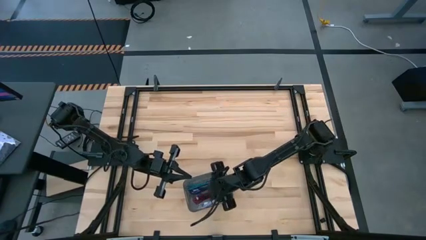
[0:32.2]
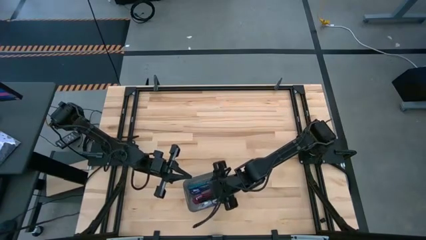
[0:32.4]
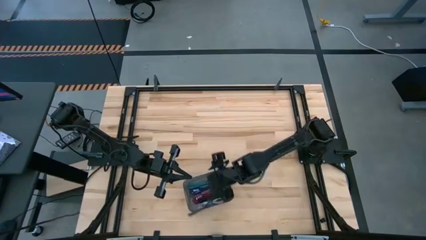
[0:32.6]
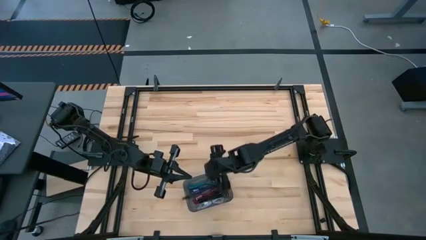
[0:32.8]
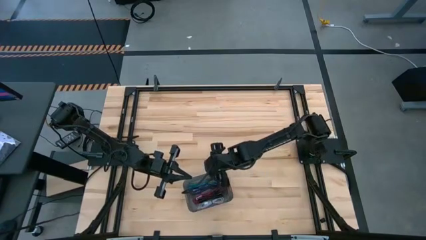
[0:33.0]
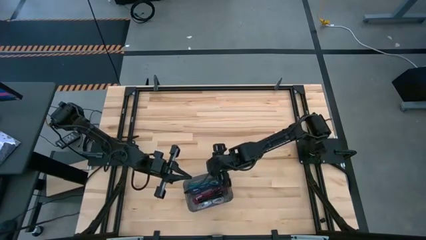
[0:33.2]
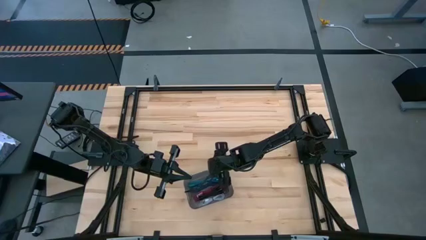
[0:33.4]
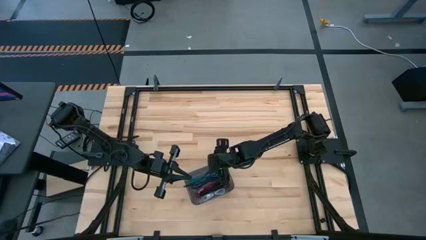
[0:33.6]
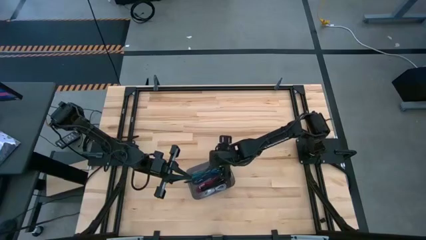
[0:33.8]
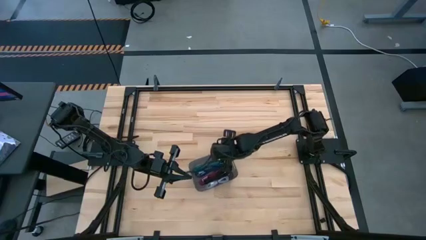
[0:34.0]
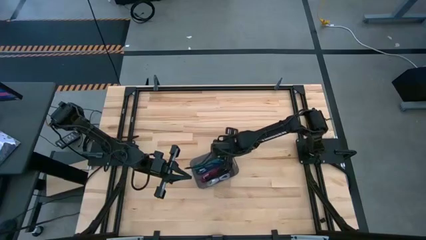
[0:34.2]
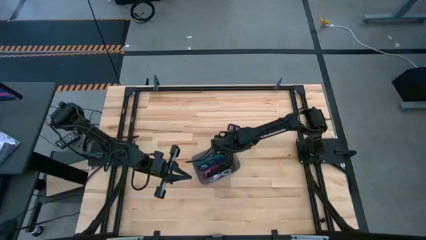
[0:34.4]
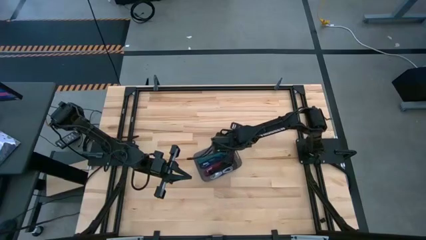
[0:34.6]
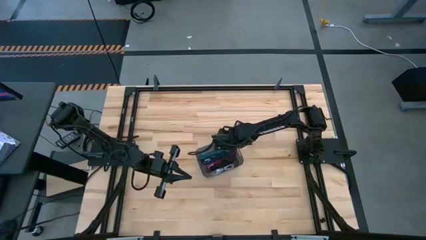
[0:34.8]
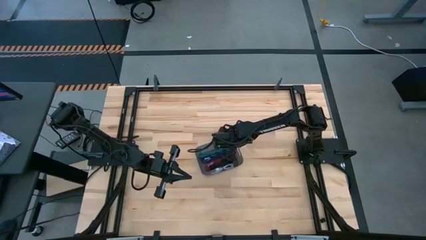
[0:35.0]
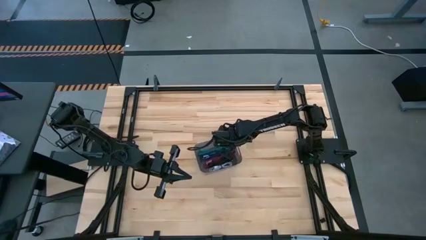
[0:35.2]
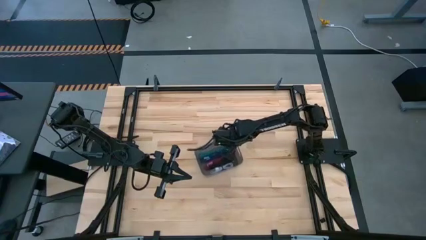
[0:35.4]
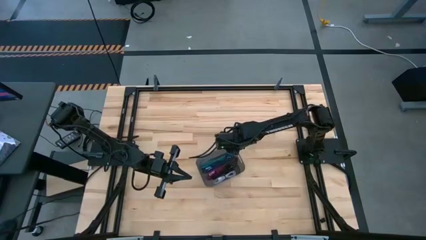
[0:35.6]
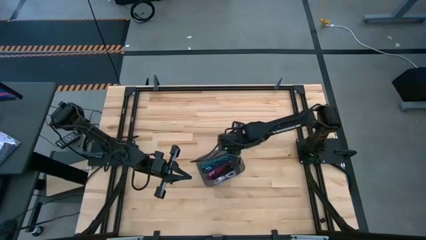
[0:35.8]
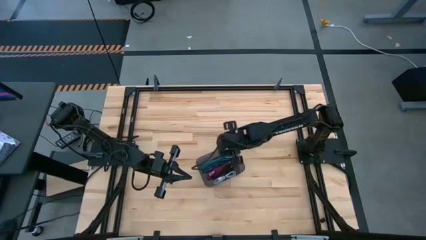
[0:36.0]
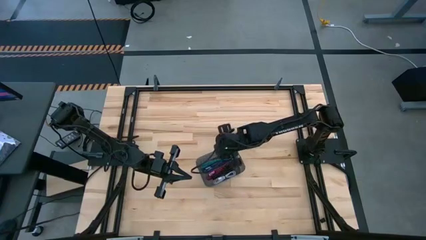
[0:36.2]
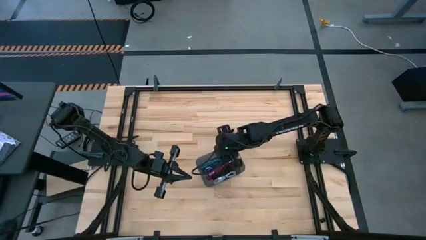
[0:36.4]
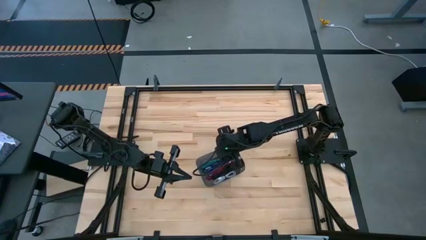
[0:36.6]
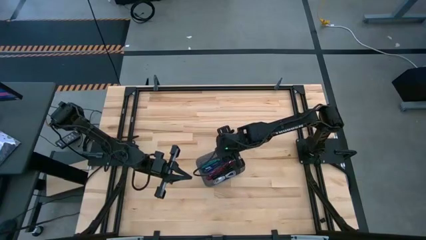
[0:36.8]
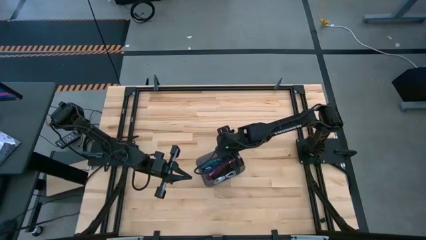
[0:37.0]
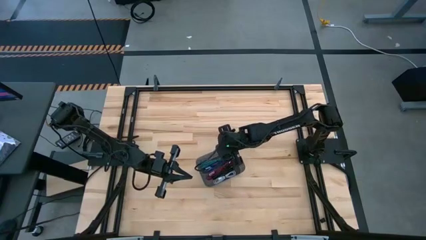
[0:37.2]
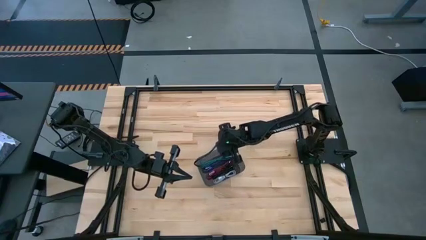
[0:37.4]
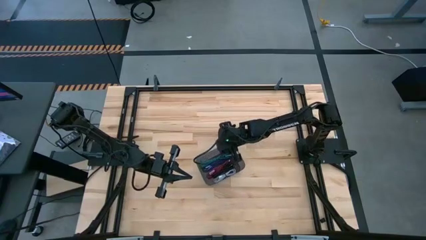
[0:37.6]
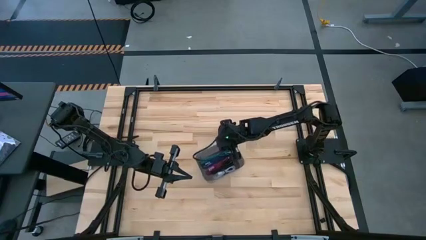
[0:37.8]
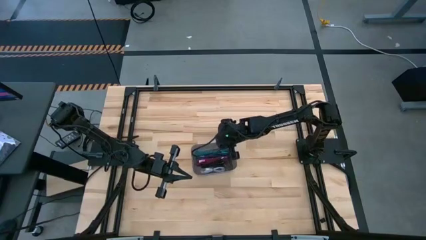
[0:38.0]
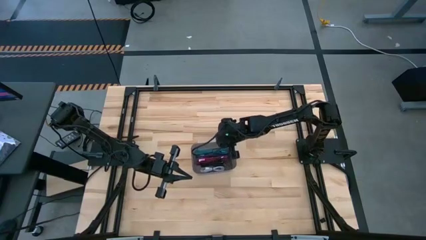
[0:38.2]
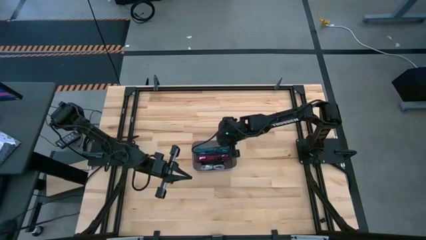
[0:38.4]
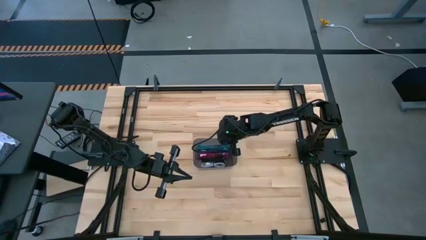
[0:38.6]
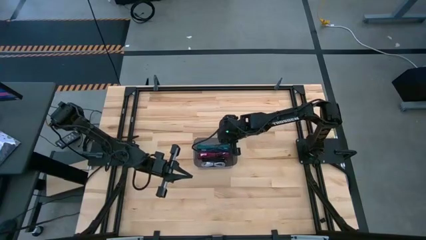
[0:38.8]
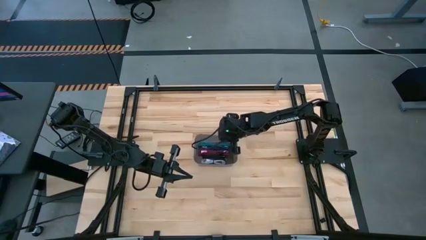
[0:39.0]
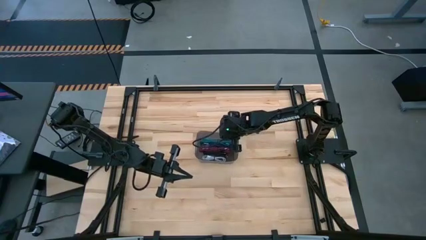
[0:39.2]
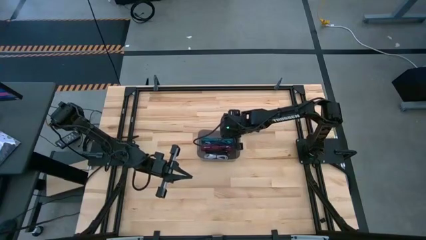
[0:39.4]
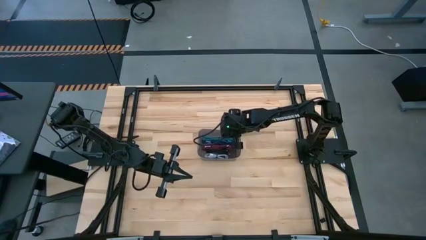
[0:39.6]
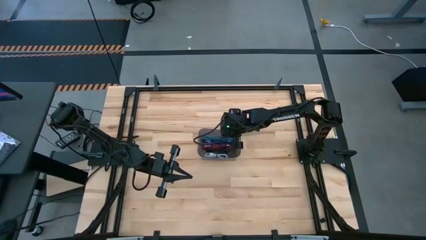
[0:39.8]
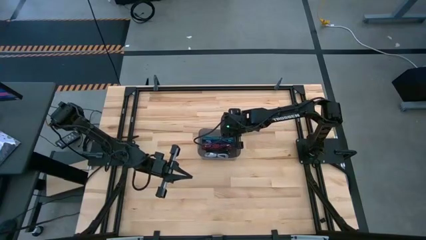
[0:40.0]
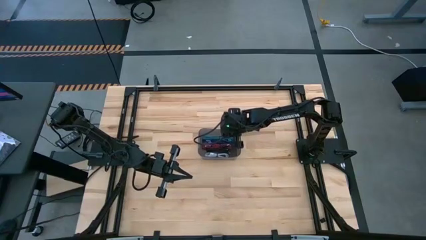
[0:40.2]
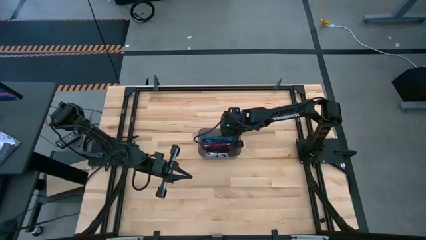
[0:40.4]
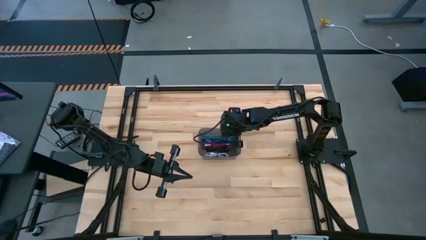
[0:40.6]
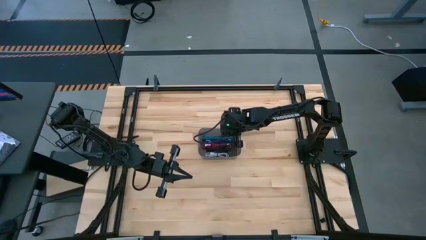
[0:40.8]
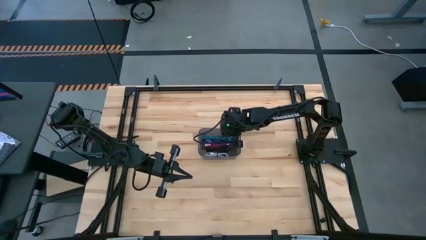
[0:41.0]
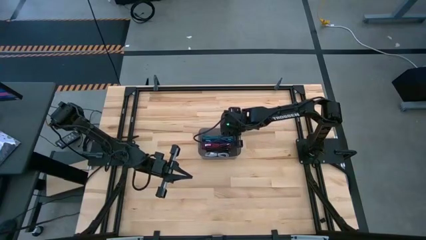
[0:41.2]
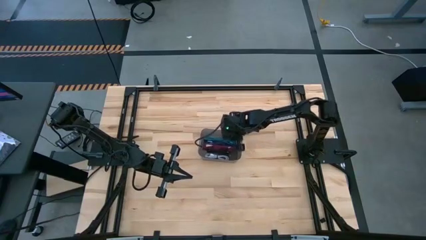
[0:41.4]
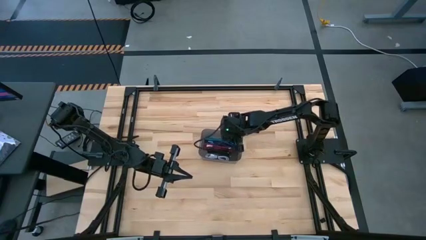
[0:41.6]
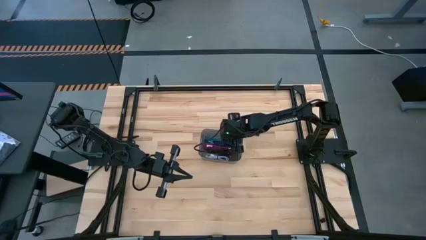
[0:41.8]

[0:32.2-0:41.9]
Task: Pick and place USB-C Cables
Move the black bin to the center of the table

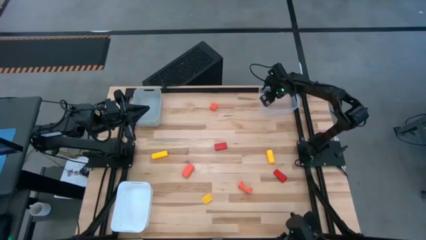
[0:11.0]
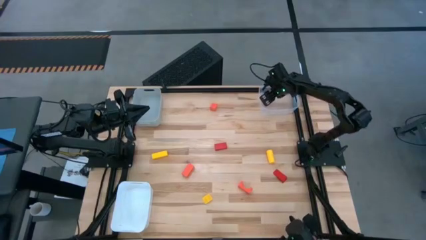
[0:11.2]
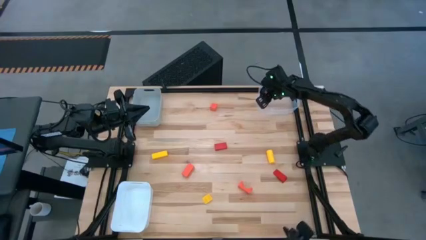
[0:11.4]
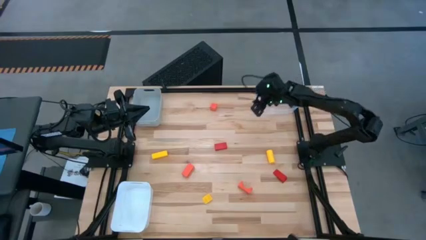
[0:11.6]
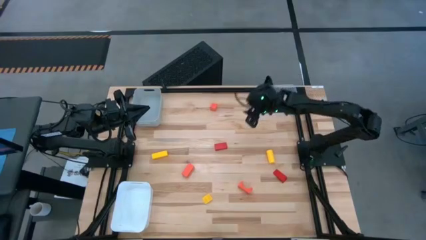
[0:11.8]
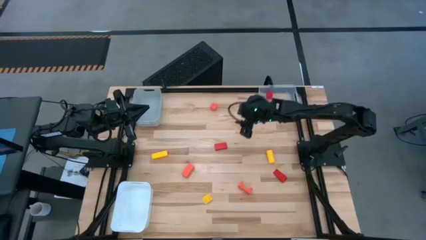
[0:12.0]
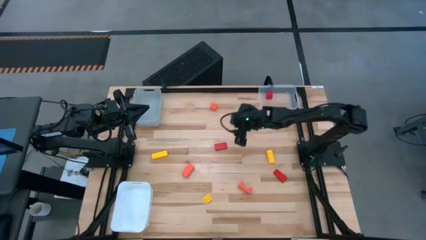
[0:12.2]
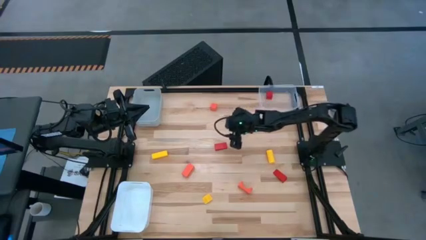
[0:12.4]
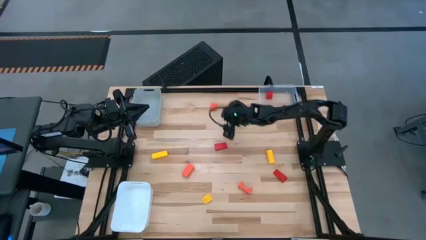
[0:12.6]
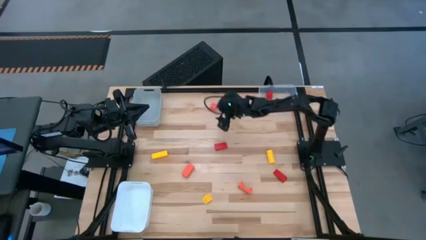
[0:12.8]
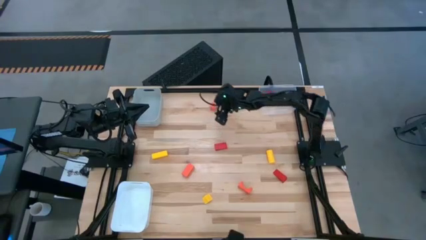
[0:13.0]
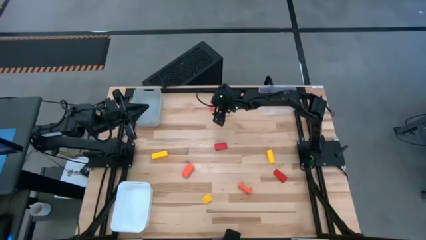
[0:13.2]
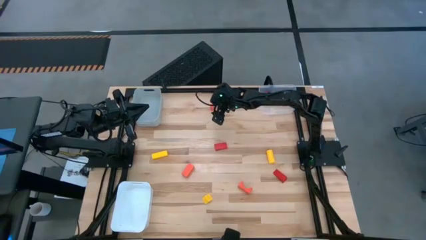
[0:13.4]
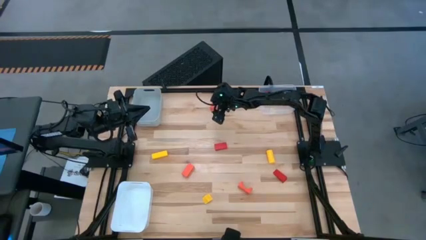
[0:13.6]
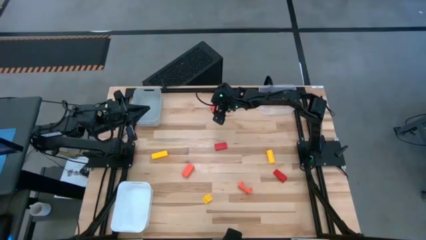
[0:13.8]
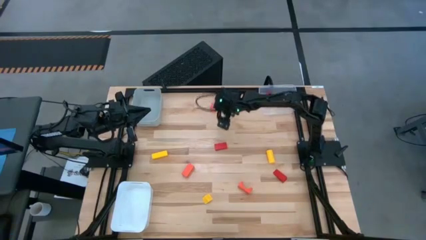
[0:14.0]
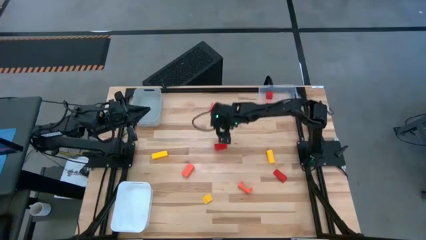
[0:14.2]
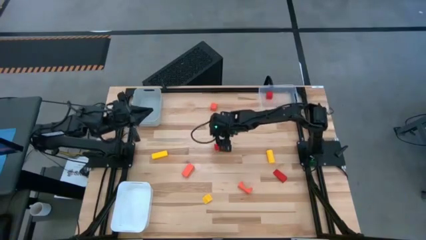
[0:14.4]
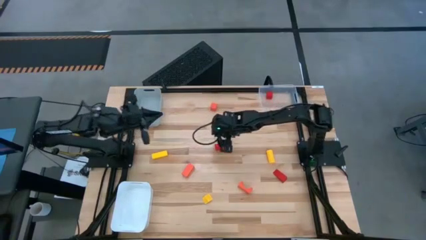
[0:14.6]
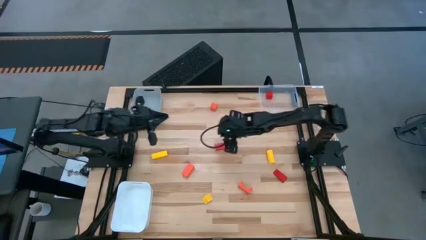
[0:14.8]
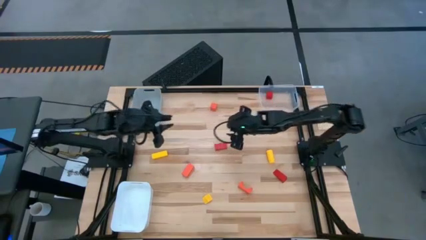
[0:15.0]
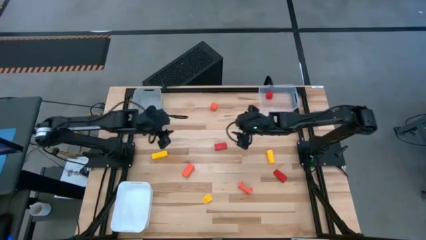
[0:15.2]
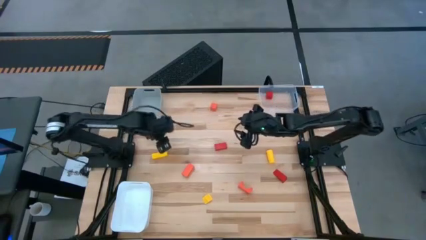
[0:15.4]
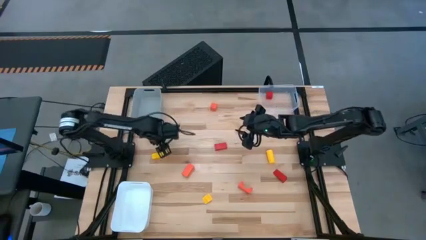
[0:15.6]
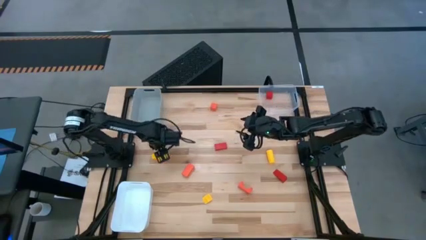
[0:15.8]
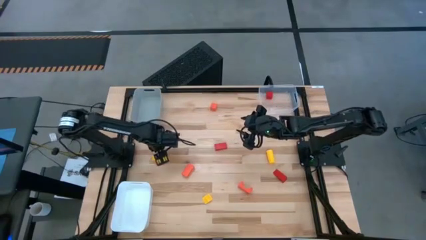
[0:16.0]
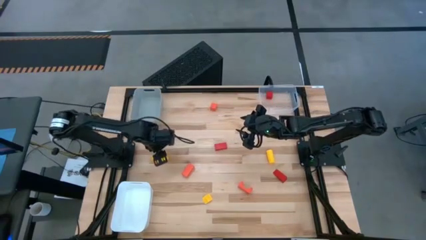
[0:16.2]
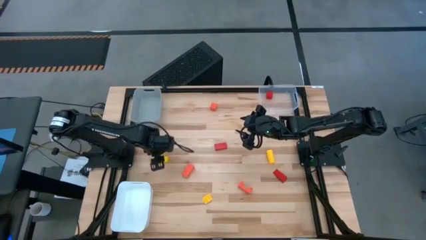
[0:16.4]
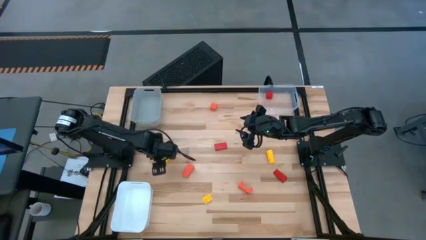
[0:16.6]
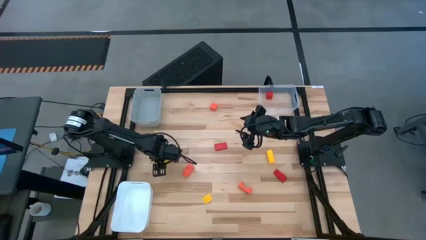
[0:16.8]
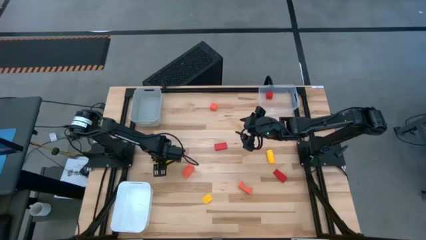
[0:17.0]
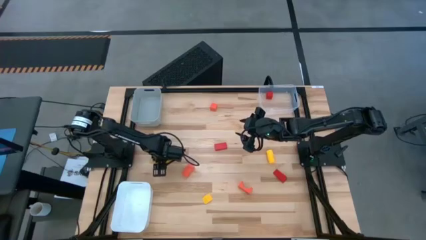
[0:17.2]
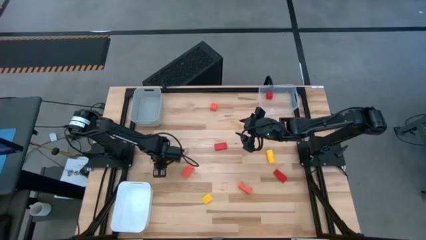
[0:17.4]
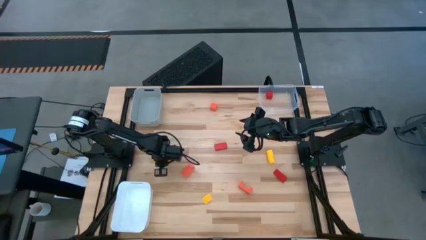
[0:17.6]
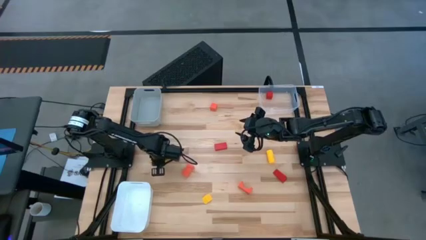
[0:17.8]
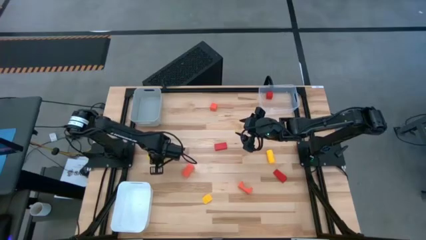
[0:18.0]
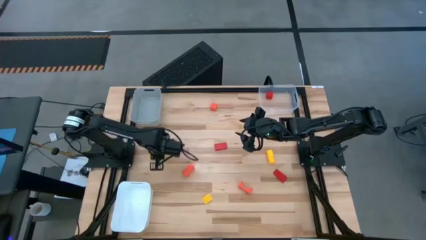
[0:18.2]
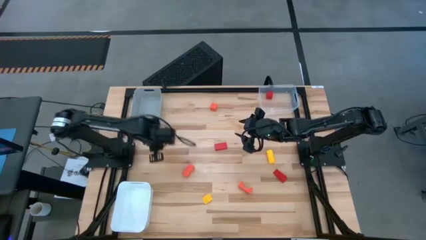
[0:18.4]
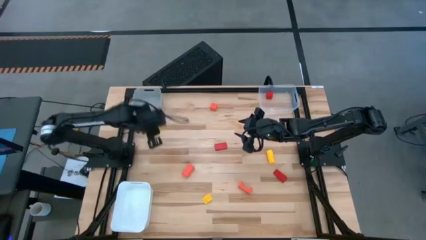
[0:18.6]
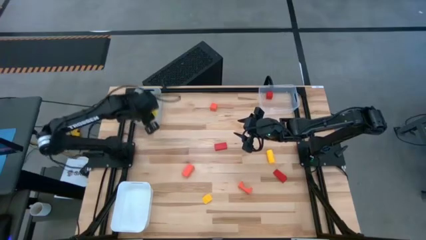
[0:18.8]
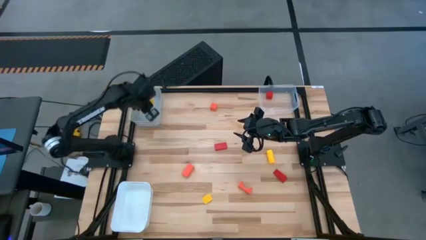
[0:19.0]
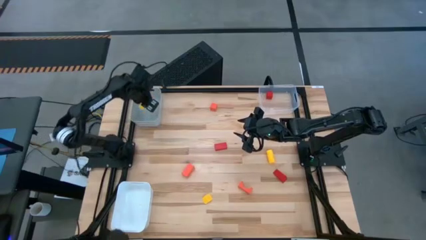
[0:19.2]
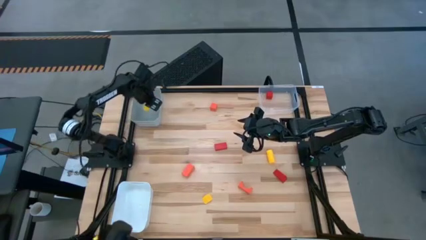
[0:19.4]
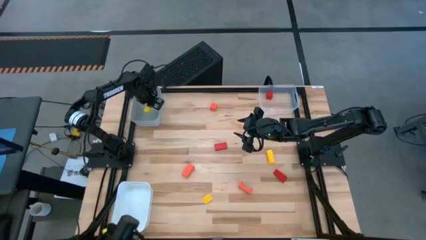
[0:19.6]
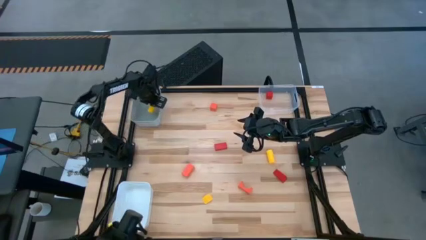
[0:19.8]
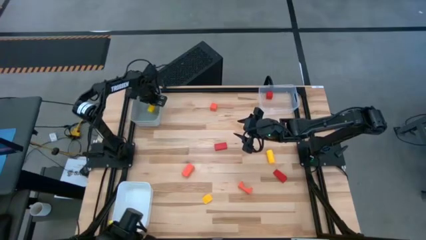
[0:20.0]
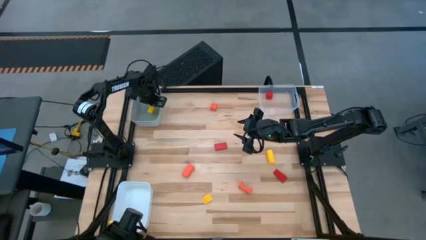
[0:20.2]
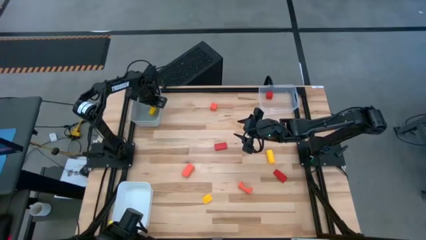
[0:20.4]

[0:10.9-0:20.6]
Task: Sort & place blocks by color
Put the left yellow block into the gray bin
